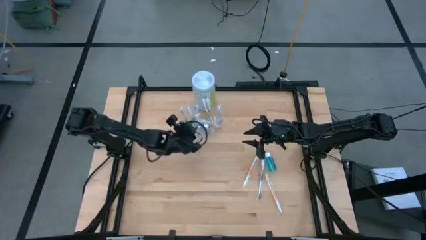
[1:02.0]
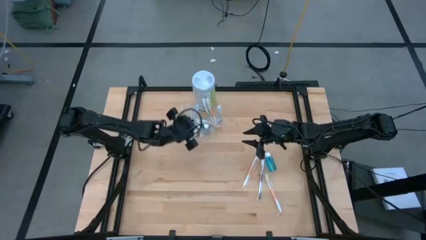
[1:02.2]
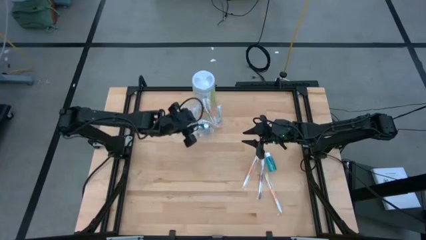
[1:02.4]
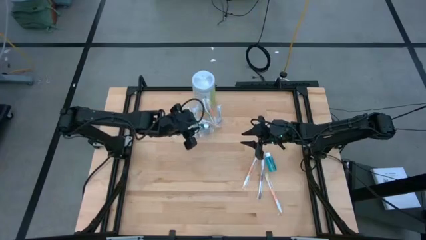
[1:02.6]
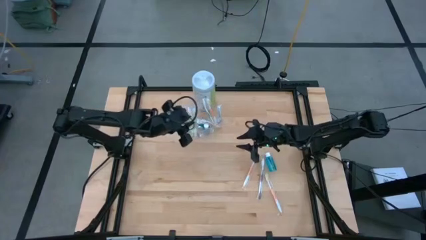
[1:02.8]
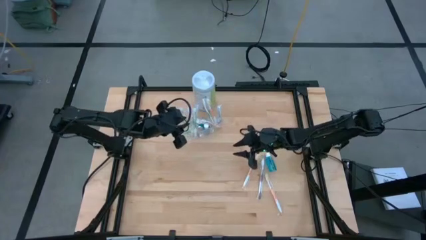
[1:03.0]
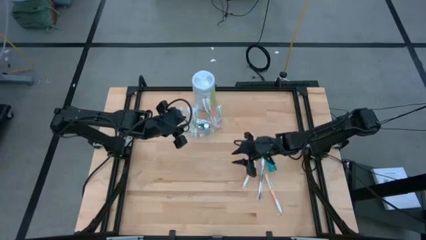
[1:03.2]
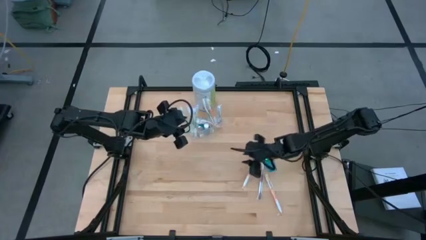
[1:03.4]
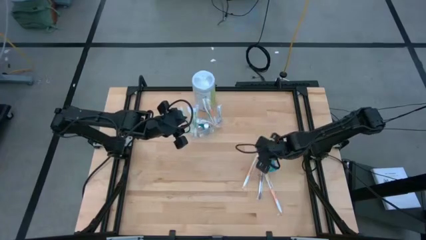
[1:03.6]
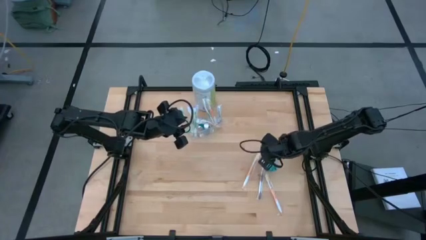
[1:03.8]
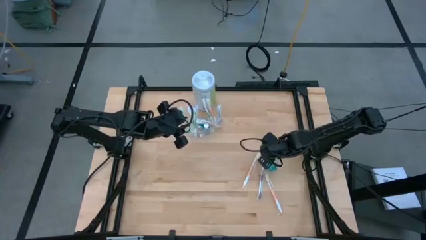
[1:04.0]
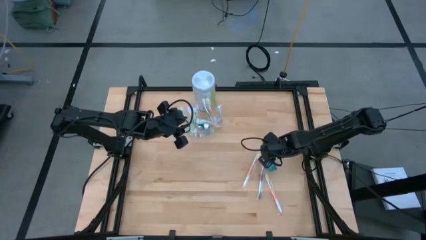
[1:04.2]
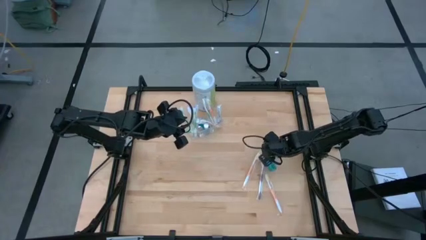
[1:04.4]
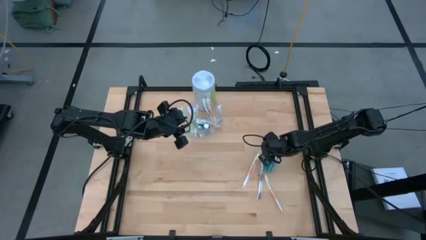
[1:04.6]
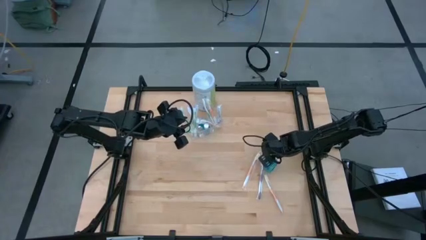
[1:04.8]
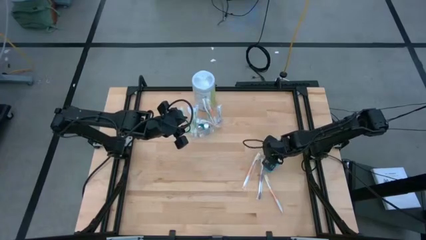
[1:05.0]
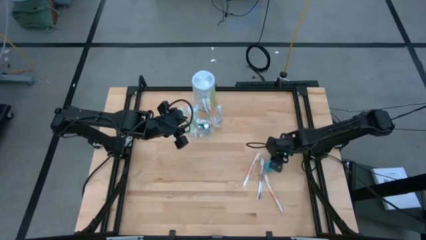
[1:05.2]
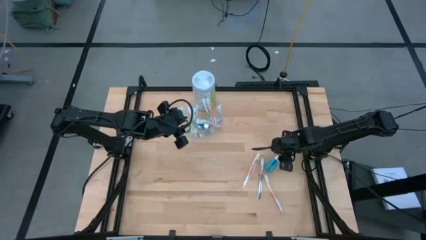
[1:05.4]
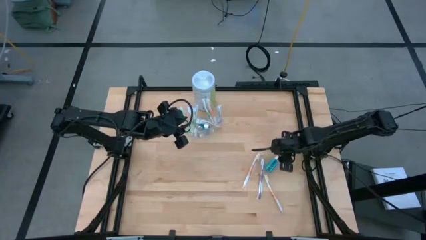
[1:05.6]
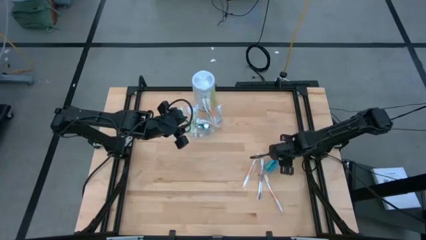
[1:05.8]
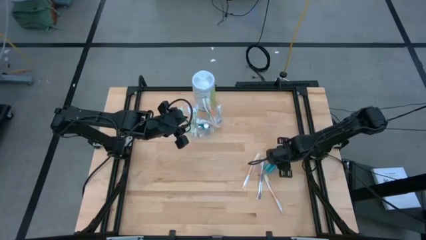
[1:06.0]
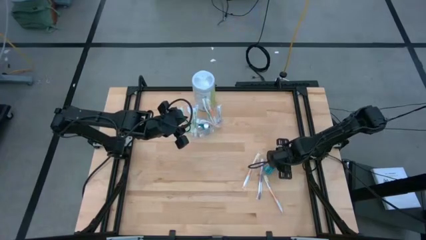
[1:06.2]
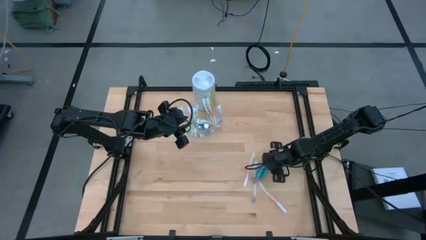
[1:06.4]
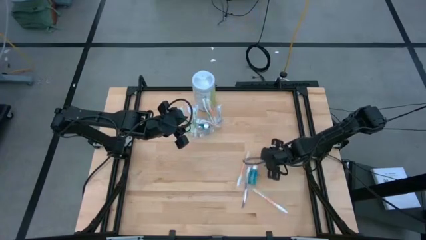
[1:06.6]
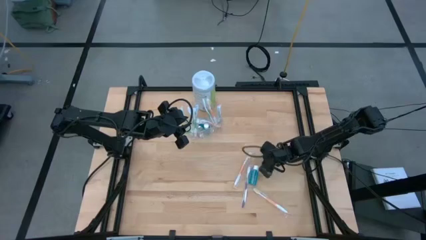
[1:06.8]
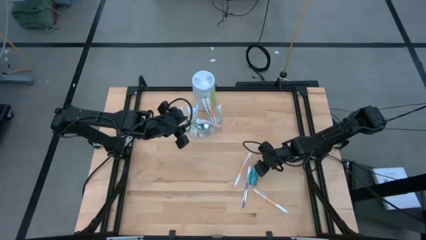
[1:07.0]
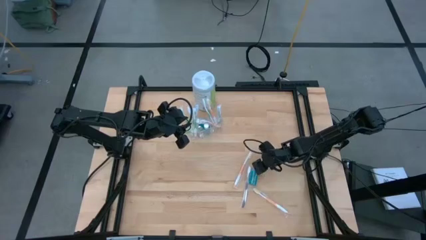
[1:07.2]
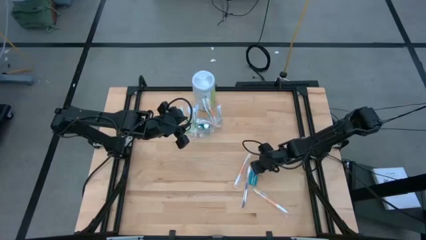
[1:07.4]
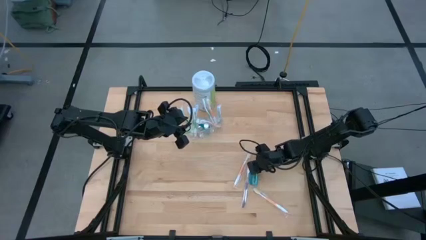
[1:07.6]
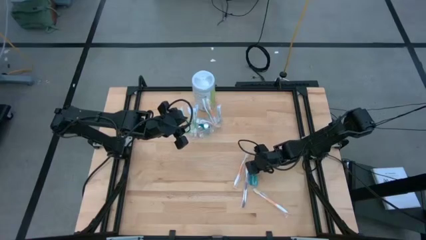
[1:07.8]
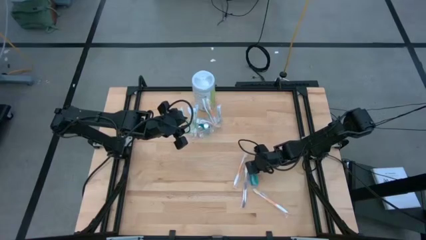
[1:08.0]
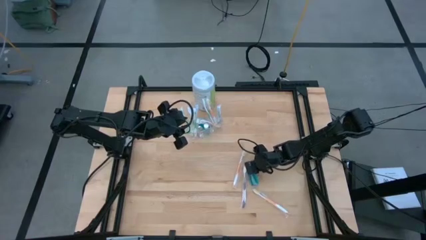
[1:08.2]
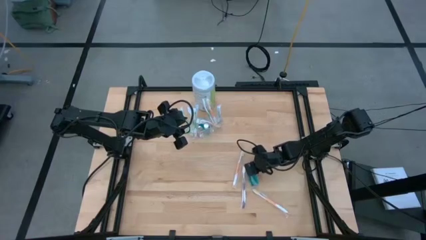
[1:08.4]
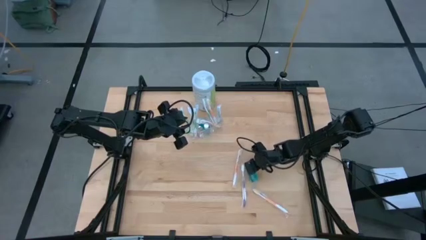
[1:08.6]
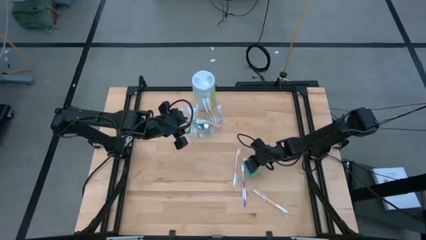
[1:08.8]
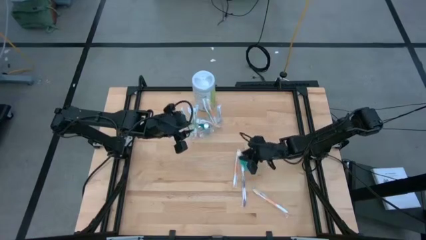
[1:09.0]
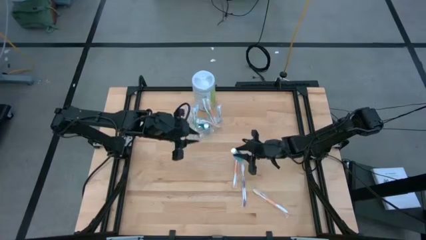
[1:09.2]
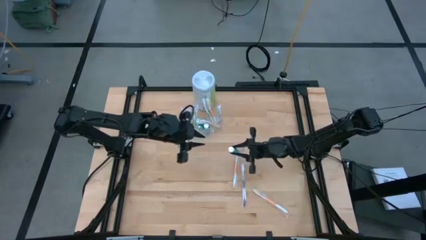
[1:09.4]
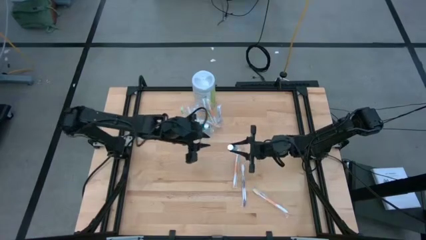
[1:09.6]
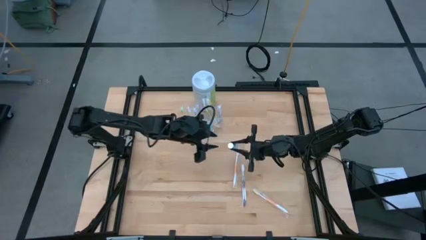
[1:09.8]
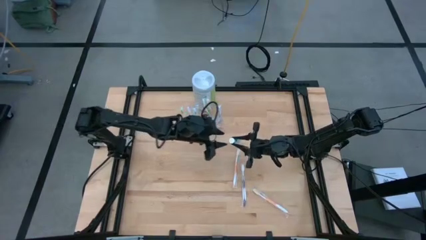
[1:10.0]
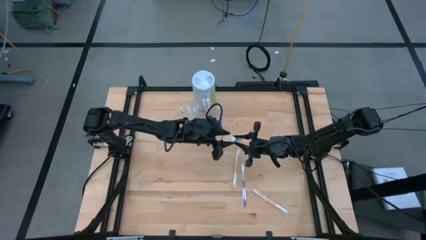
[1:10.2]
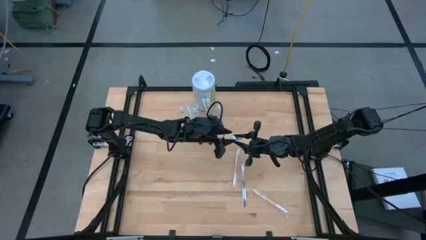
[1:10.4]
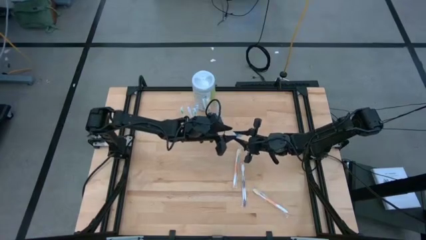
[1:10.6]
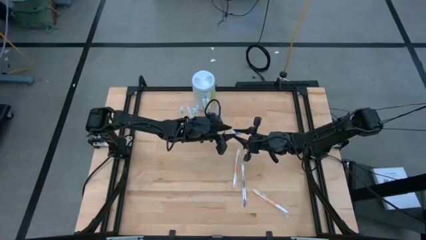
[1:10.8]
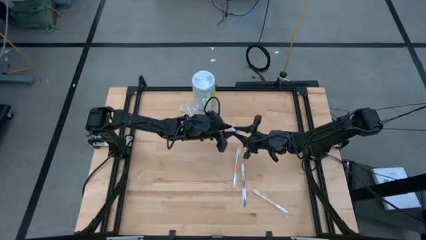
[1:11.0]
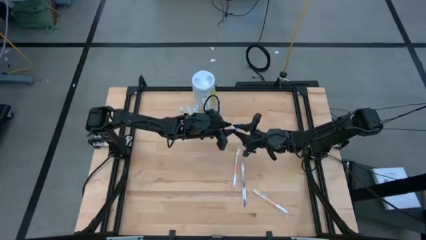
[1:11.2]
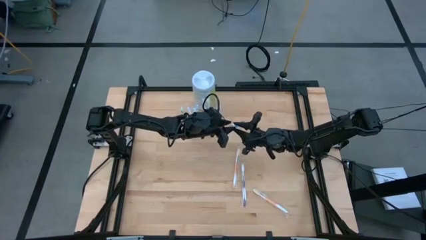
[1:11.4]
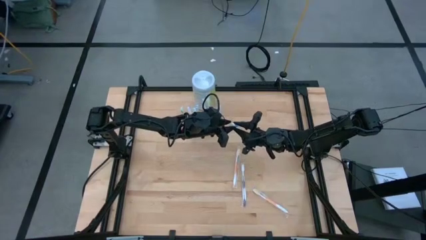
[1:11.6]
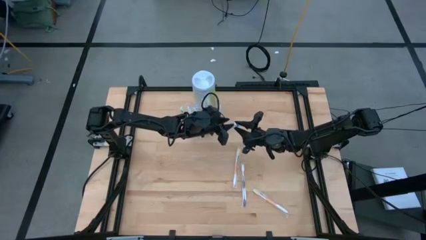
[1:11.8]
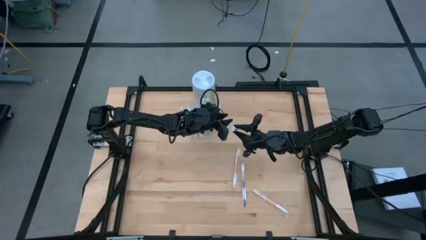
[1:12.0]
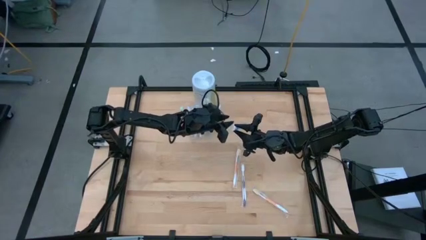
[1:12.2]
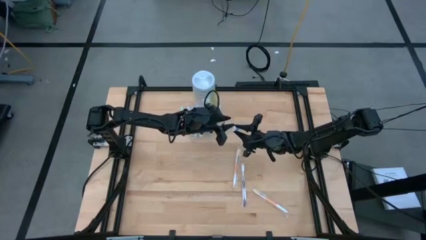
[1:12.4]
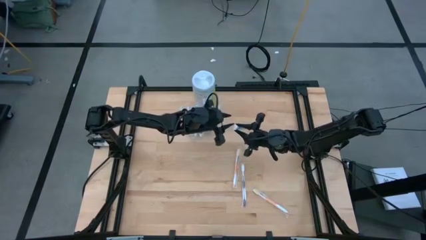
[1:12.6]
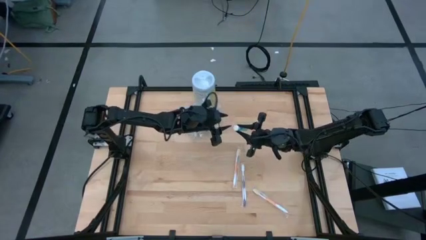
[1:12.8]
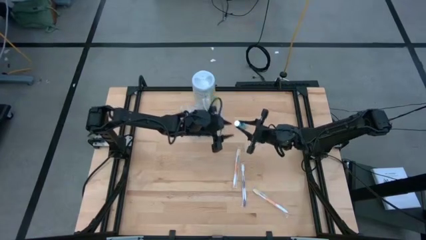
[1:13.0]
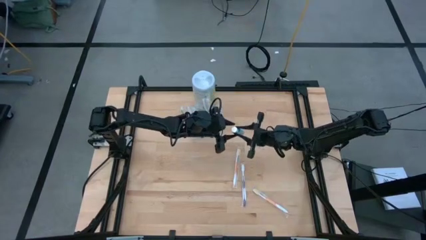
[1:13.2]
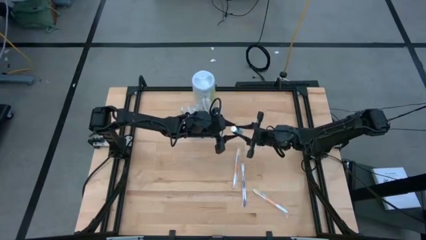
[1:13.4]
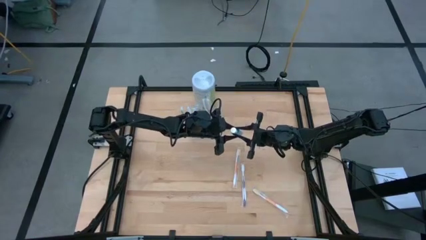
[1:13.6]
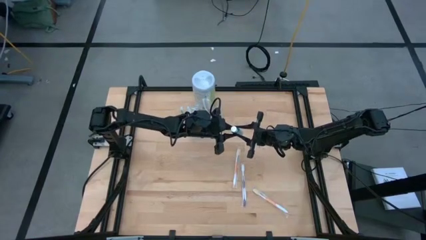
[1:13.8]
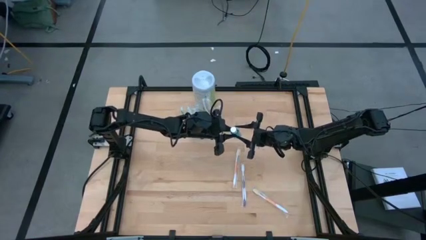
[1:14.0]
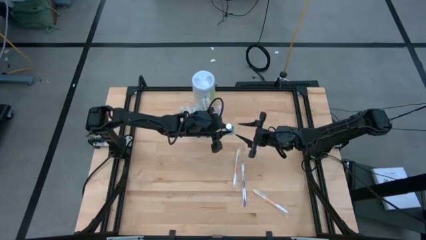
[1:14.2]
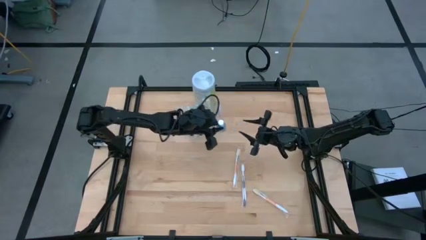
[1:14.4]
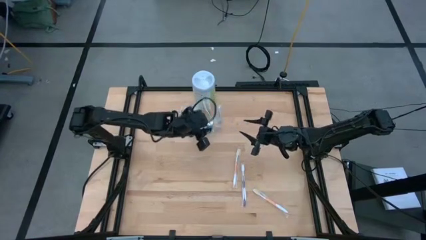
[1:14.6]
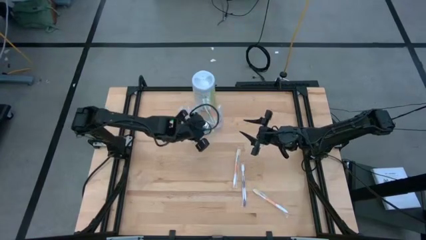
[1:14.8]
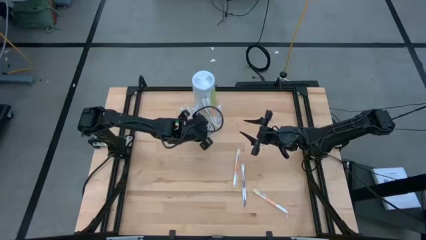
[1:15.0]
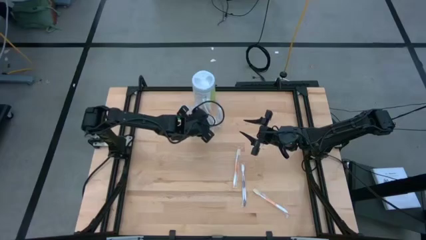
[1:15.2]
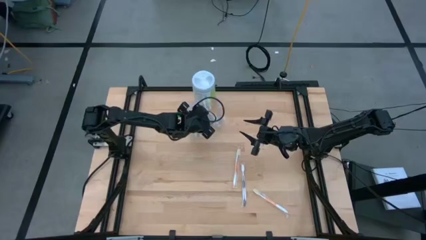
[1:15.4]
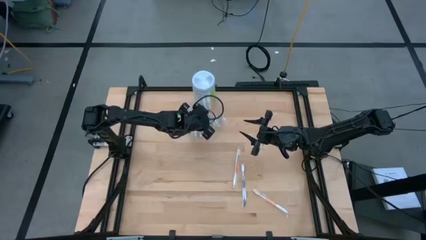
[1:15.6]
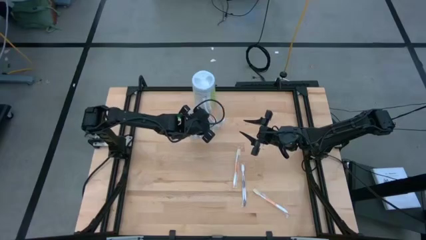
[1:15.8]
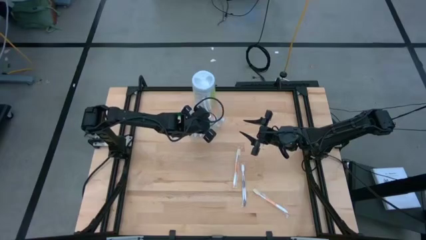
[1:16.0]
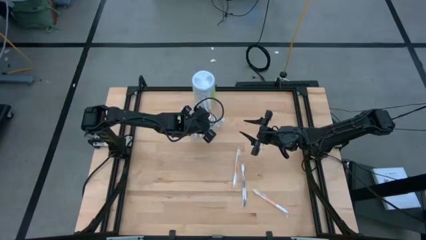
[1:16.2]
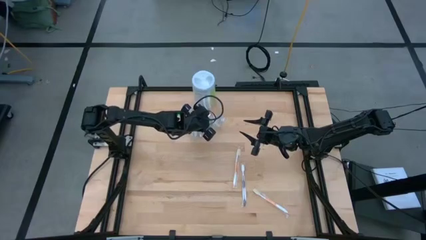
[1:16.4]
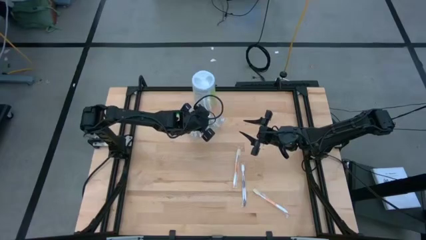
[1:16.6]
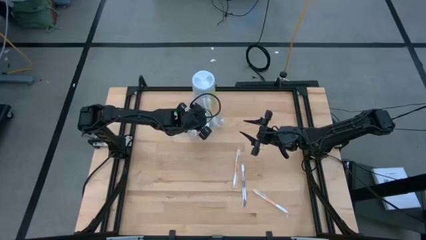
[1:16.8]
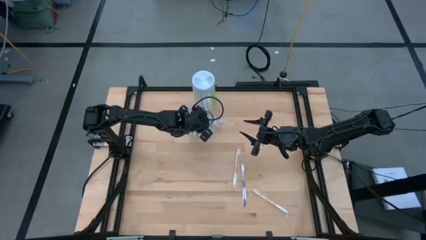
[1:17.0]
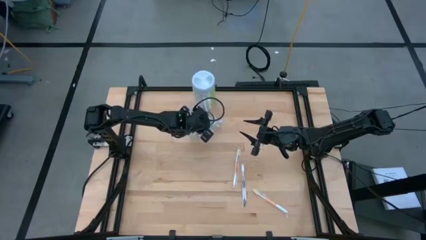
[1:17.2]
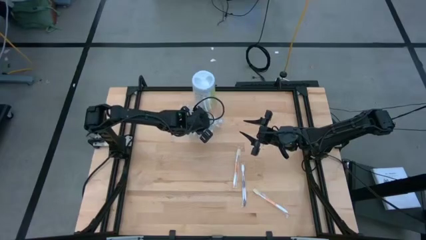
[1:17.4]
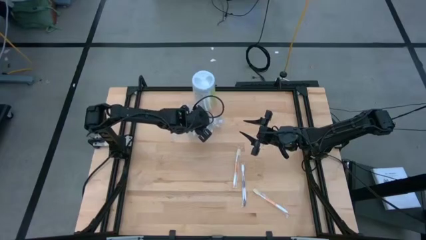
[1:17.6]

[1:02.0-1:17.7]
Task: Pick & Place toothbrushing station
Put the blue mouthwash into the transparent organizer
